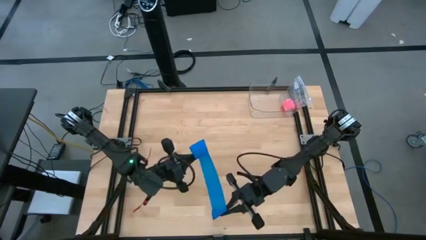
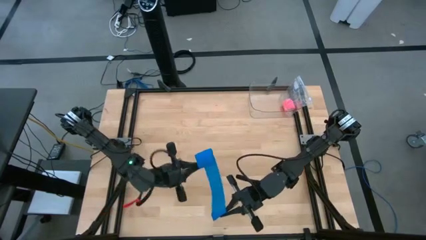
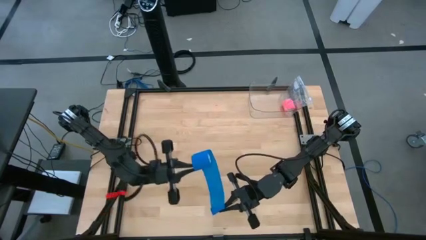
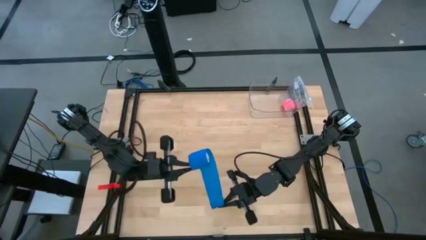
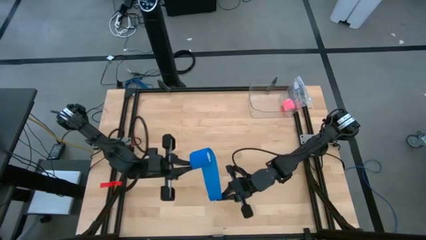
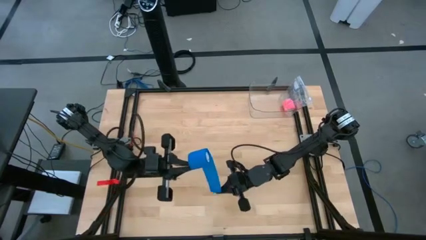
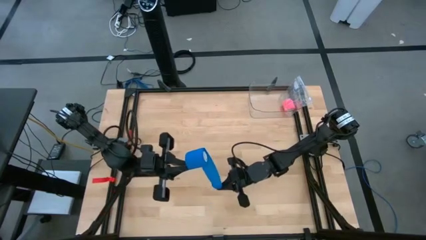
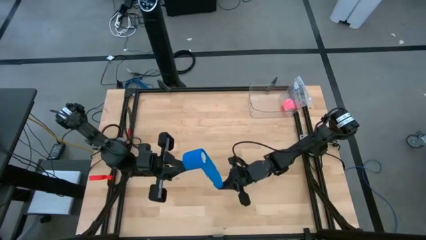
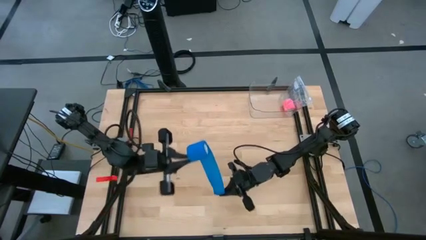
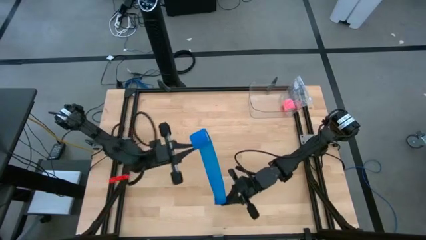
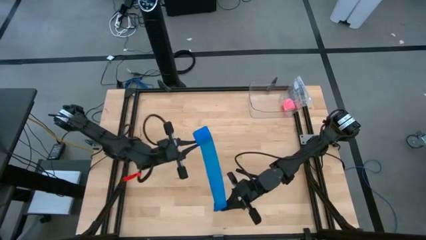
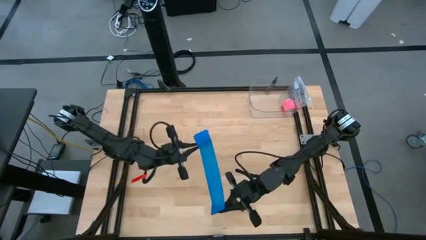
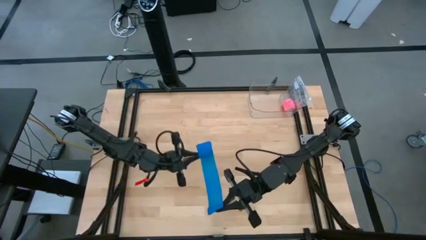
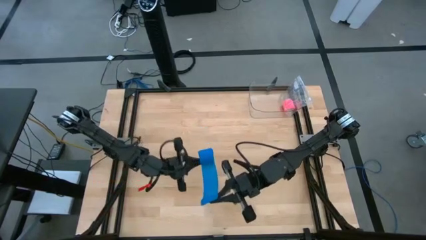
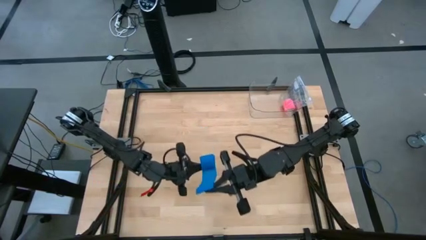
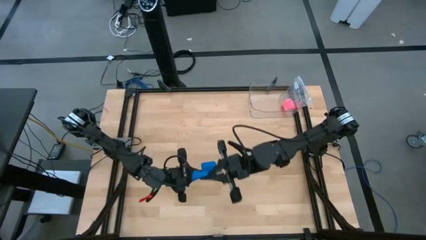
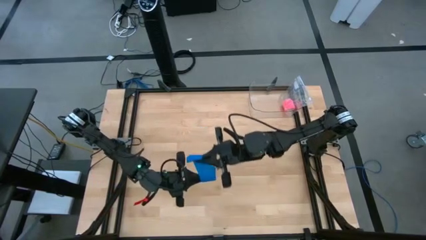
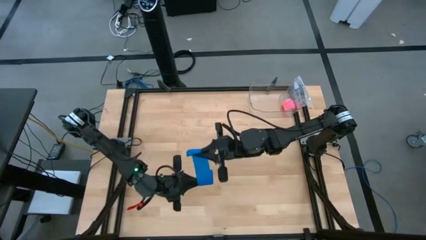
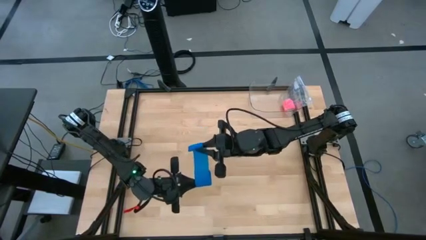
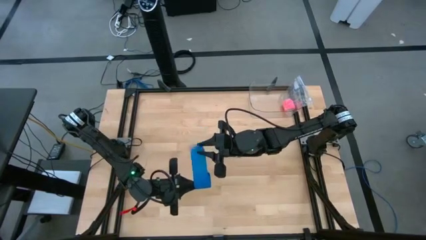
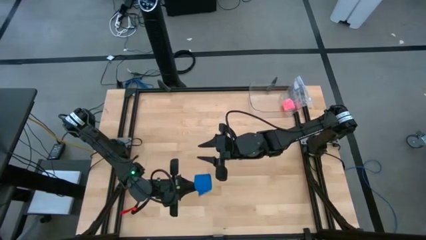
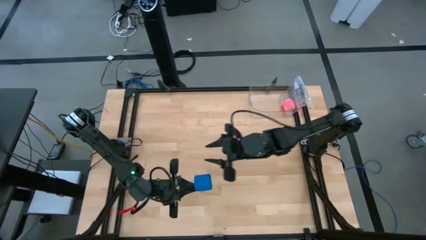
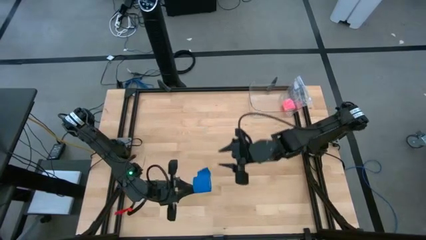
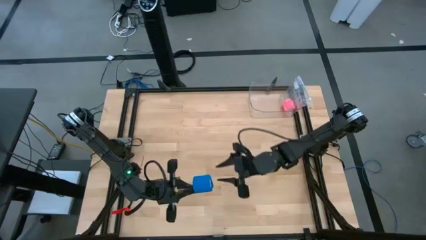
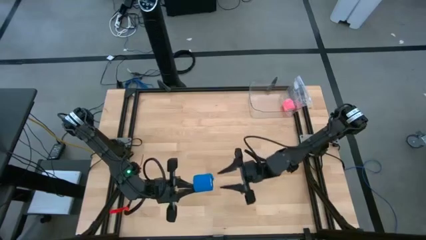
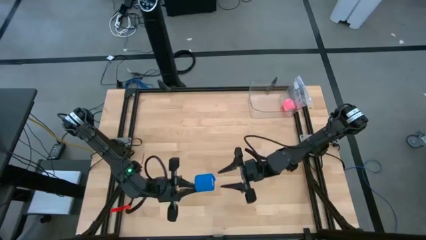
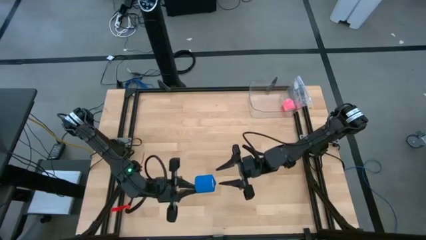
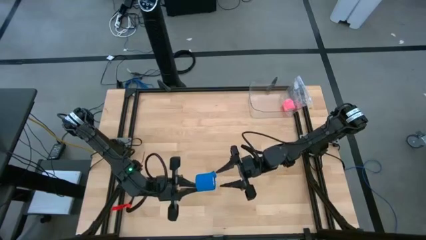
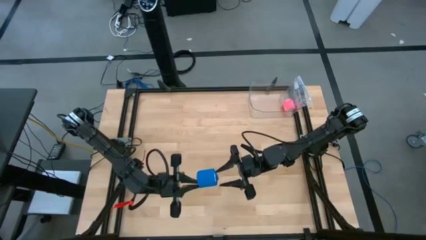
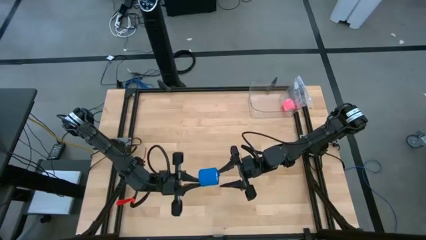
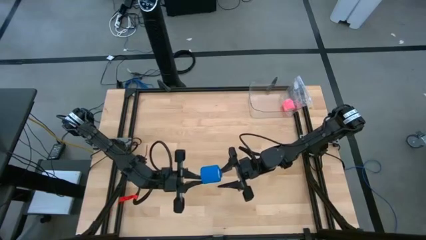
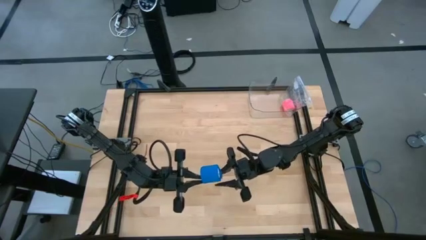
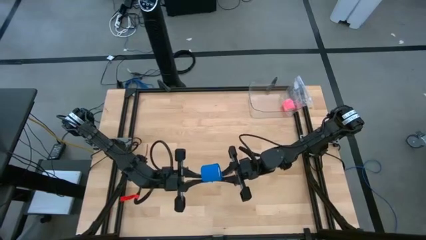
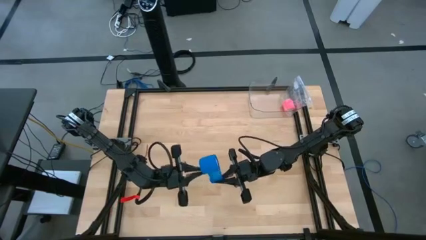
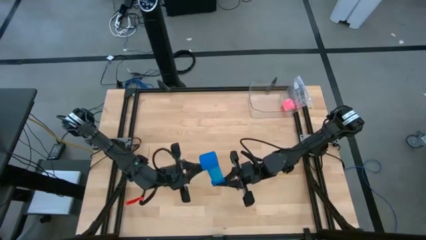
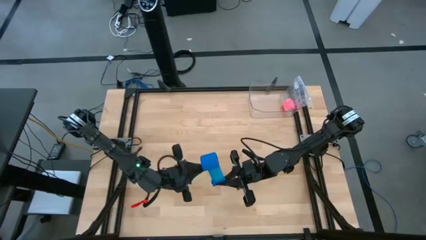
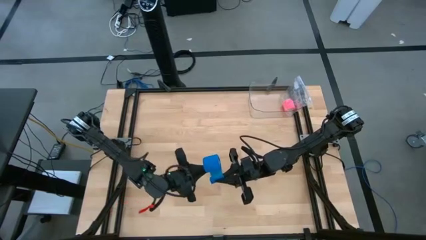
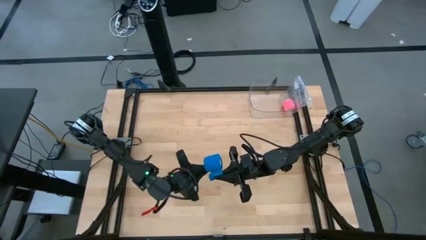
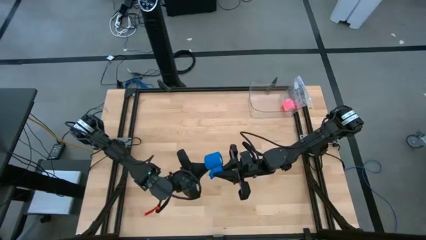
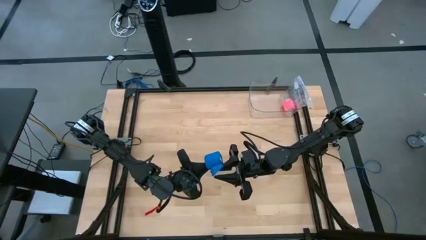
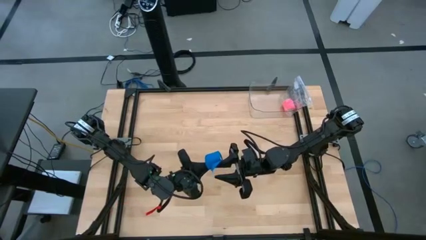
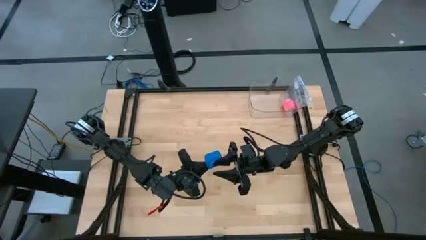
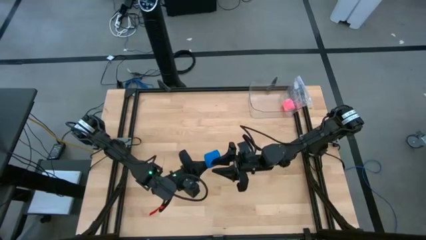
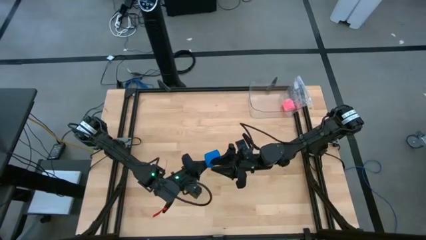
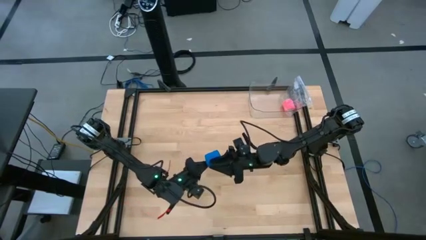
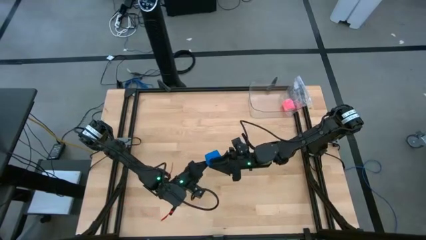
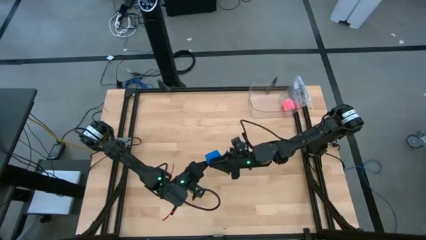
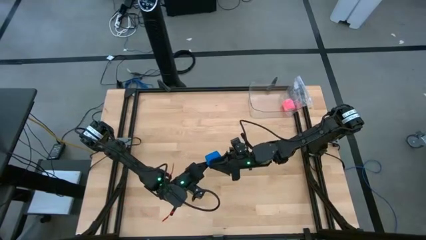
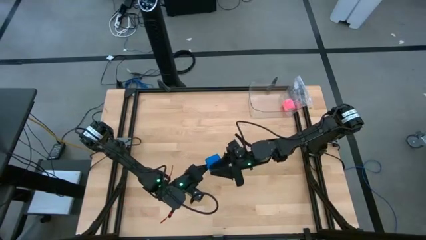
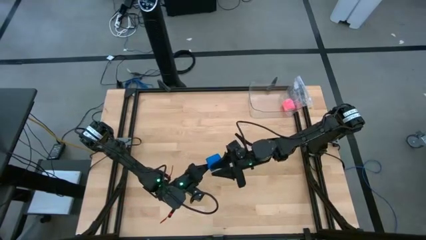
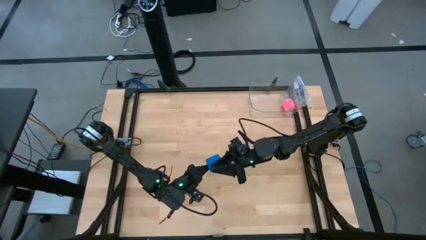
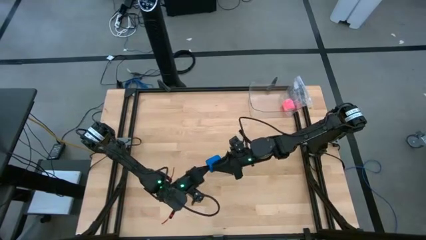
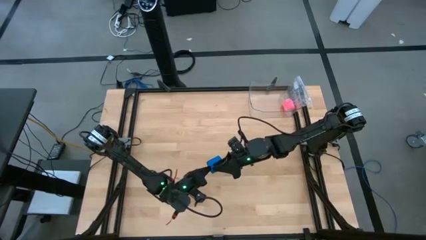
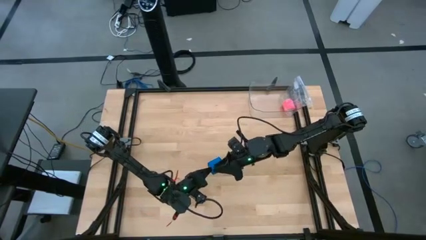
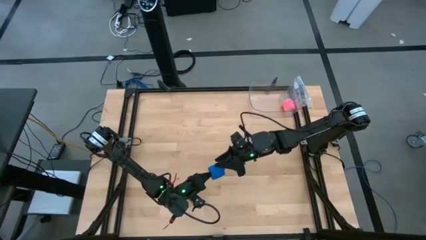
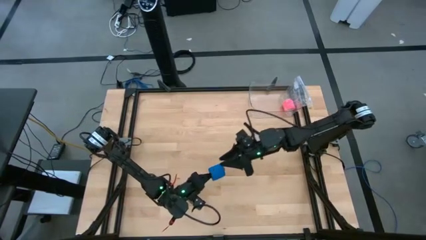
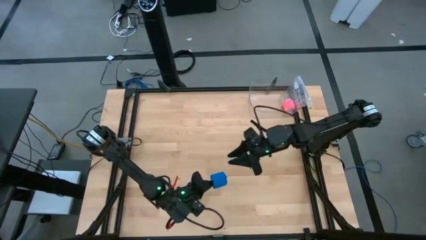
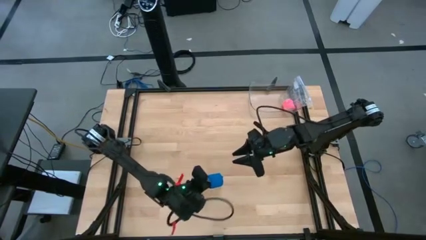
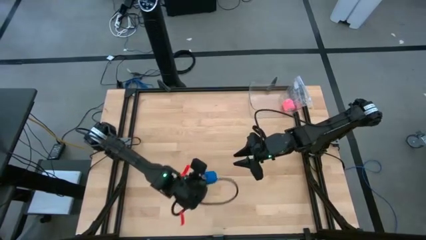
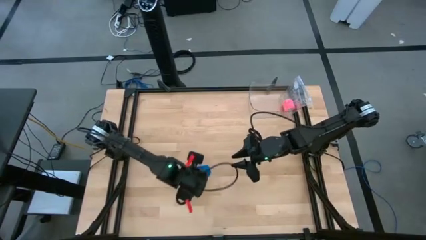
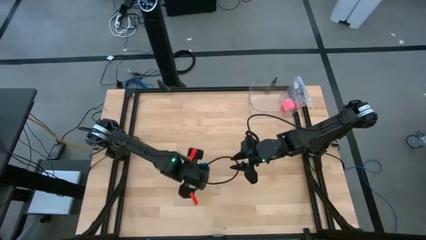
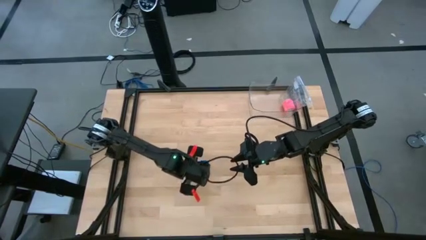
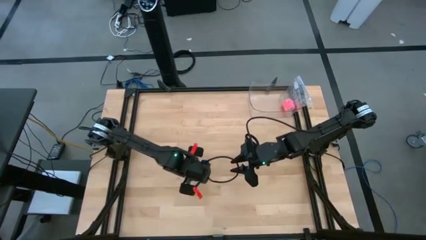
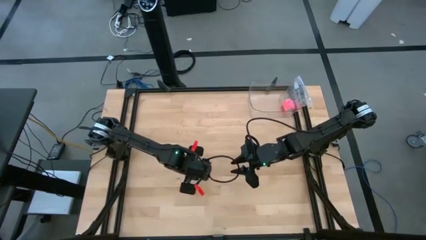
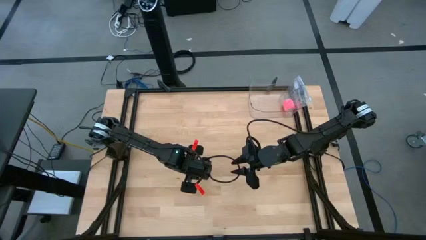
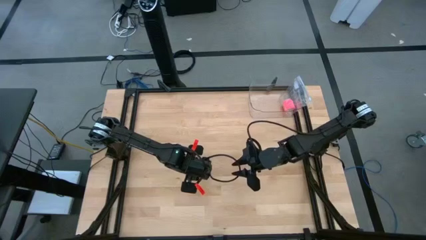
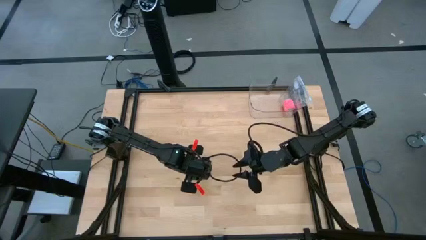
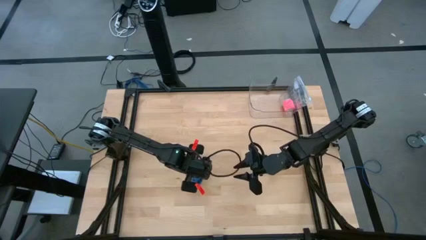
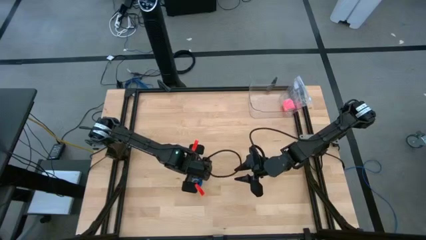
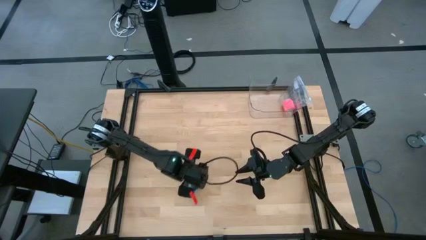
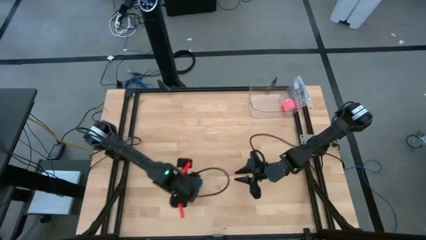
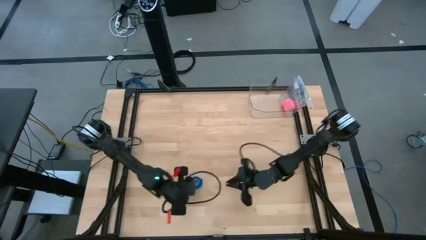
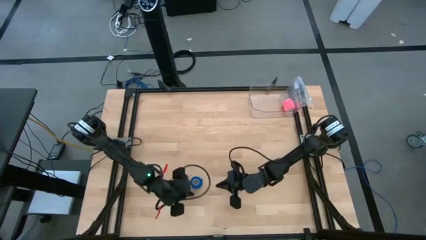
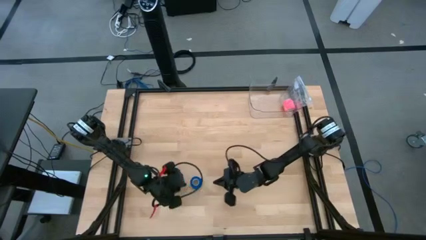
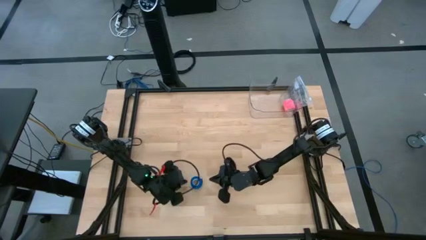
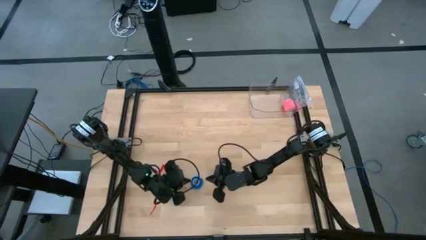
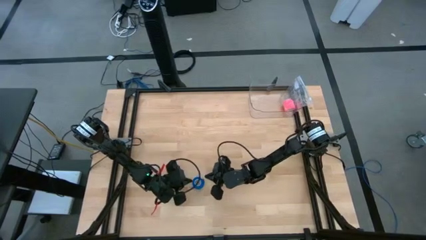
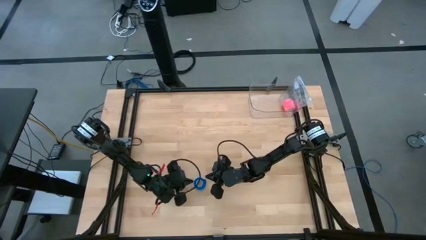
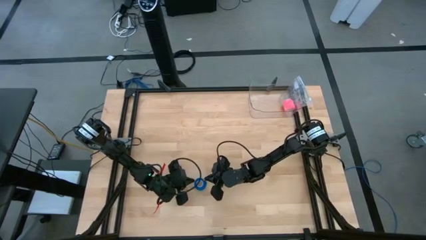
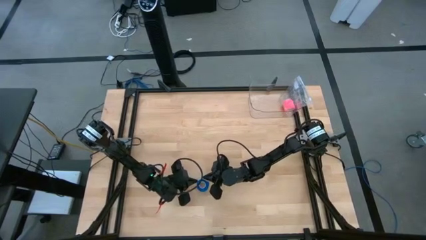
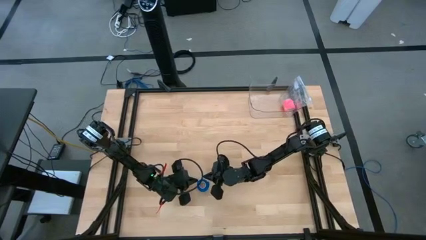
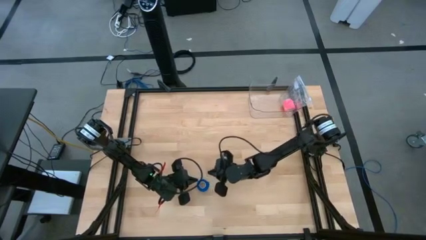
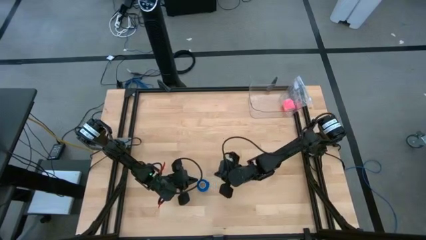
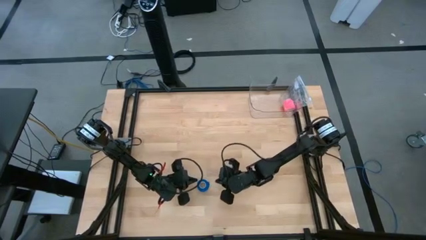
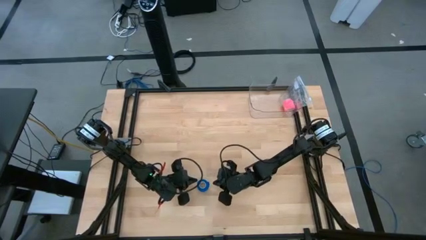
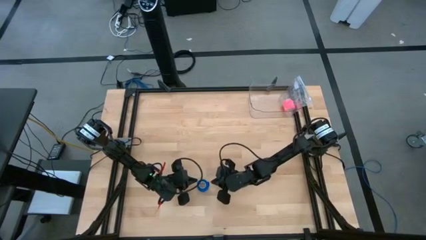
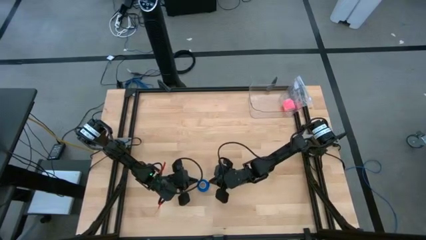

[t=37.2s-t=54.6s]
Task: Roll bandage
Roll the blue bandage
